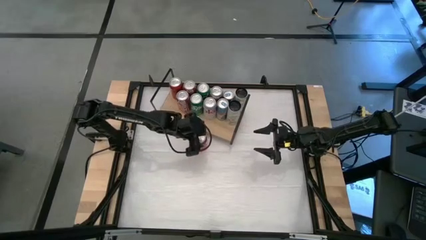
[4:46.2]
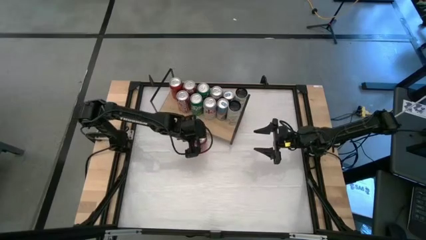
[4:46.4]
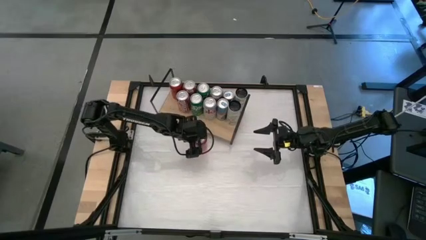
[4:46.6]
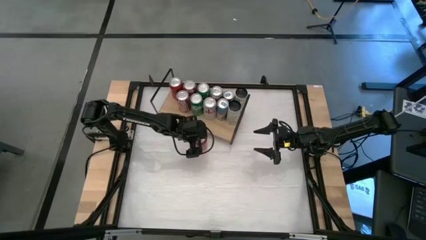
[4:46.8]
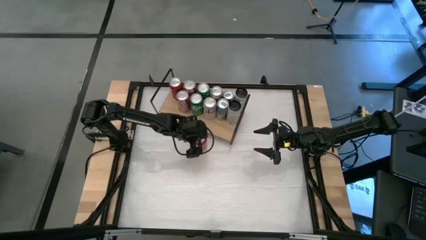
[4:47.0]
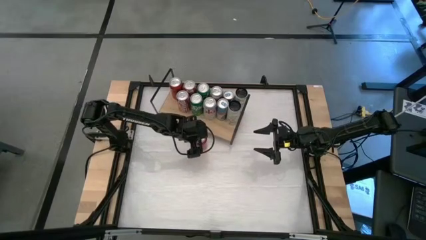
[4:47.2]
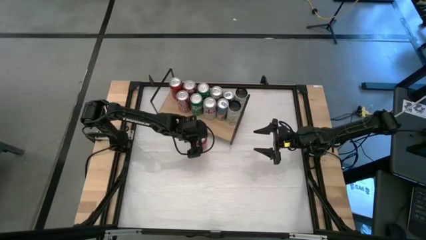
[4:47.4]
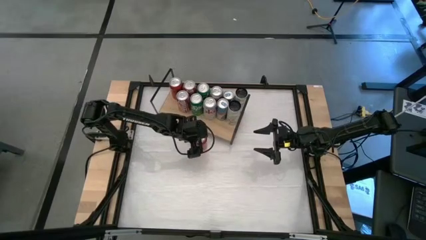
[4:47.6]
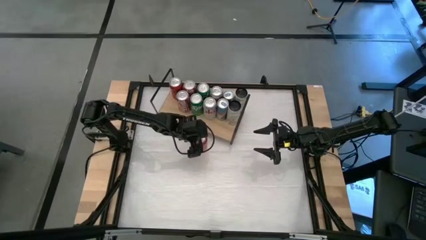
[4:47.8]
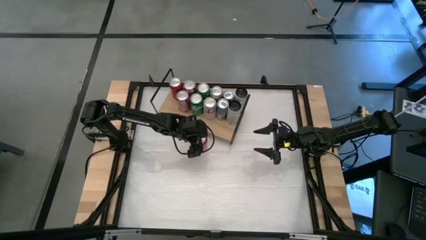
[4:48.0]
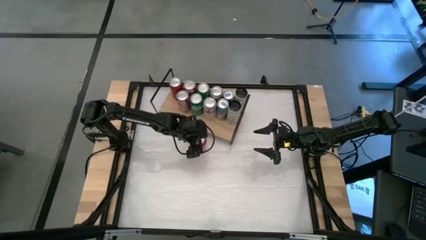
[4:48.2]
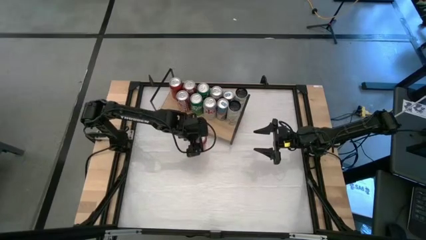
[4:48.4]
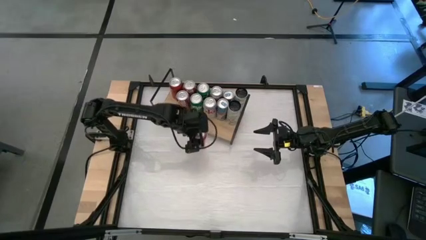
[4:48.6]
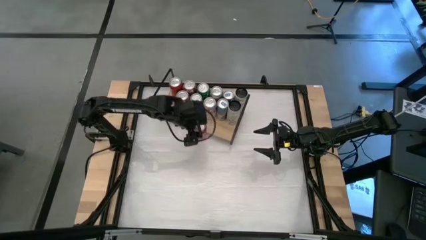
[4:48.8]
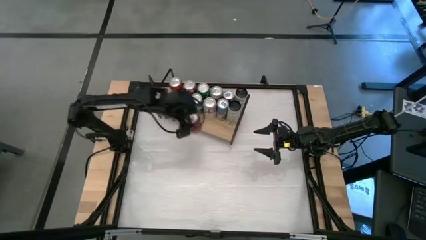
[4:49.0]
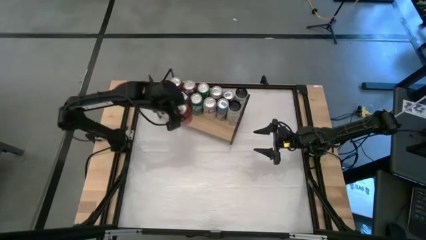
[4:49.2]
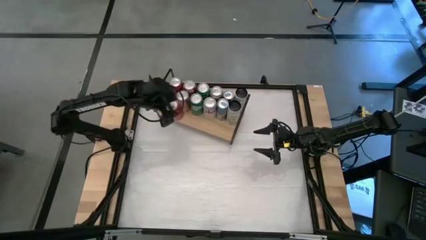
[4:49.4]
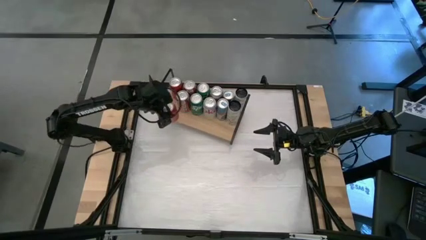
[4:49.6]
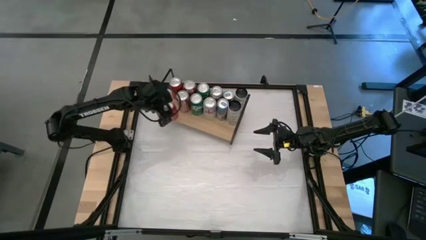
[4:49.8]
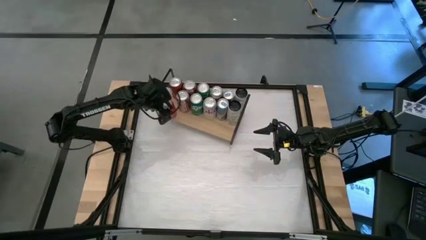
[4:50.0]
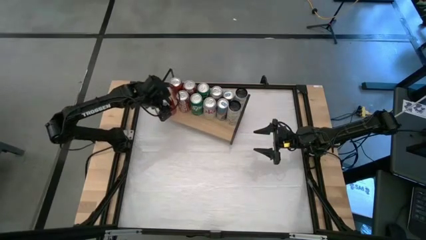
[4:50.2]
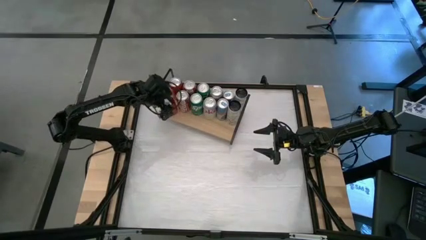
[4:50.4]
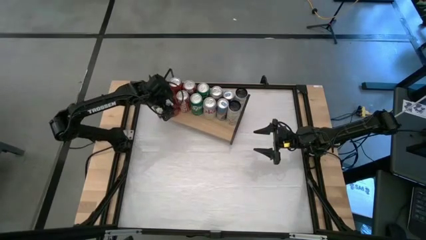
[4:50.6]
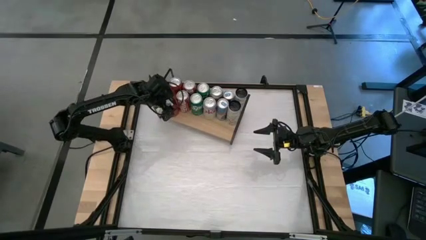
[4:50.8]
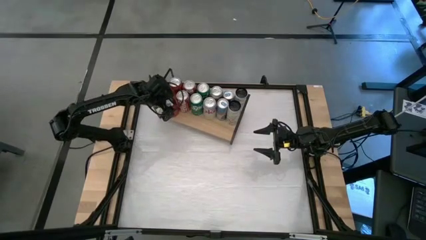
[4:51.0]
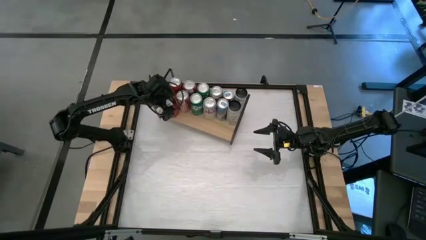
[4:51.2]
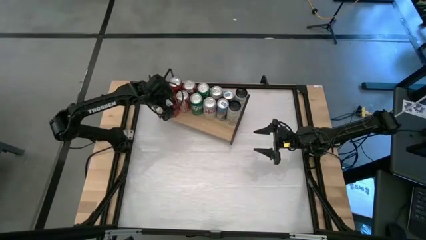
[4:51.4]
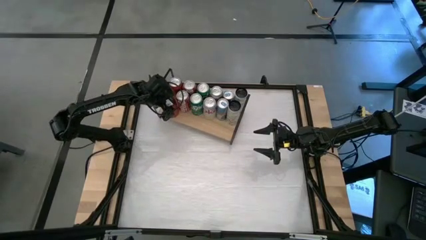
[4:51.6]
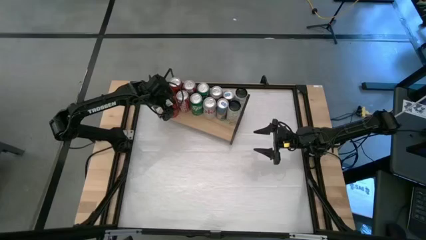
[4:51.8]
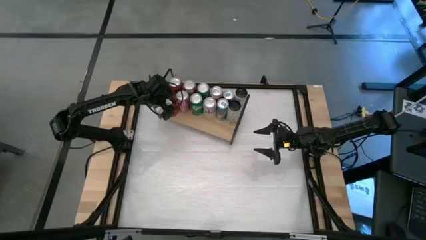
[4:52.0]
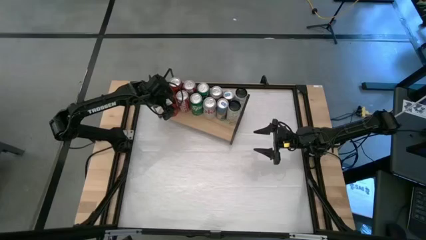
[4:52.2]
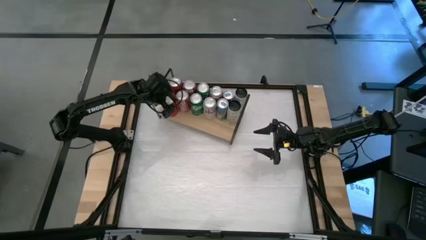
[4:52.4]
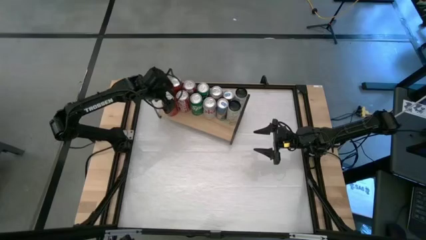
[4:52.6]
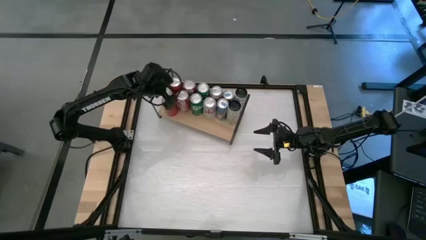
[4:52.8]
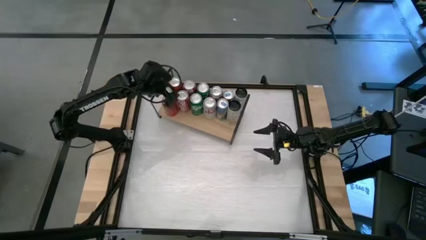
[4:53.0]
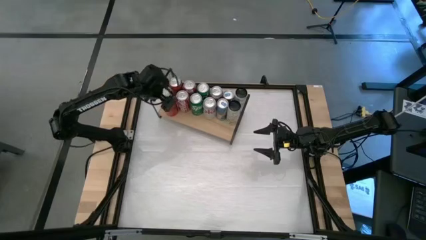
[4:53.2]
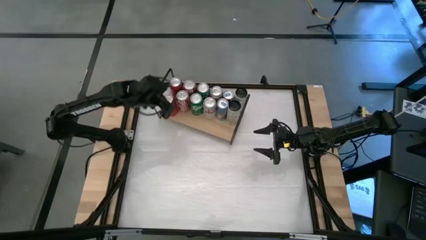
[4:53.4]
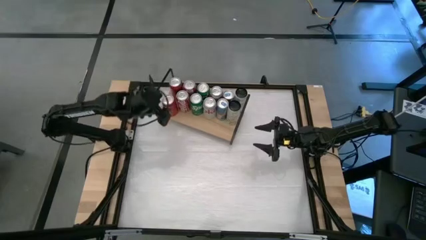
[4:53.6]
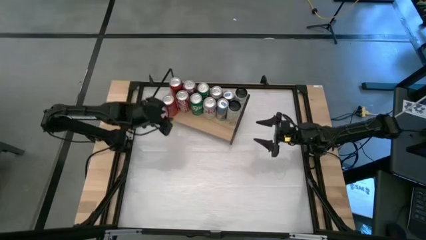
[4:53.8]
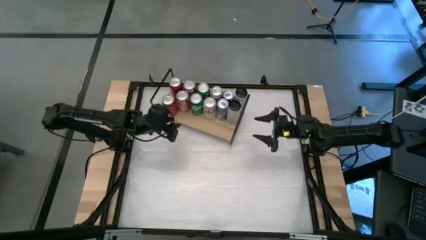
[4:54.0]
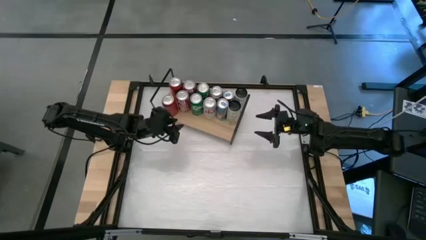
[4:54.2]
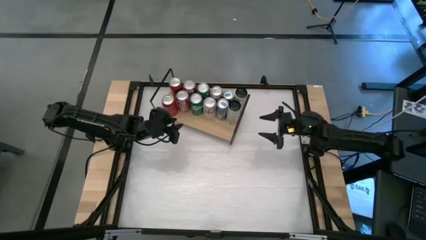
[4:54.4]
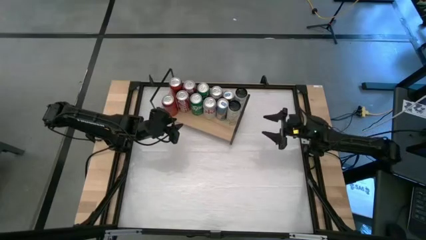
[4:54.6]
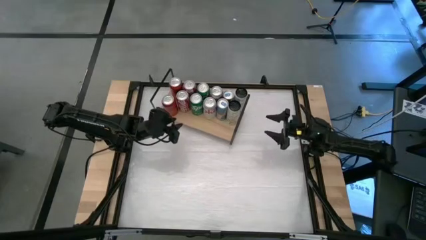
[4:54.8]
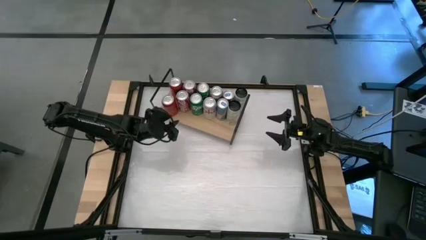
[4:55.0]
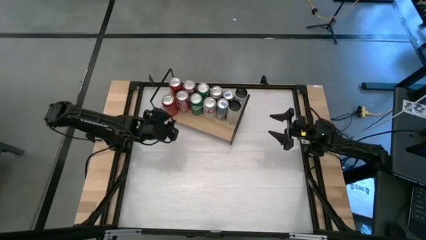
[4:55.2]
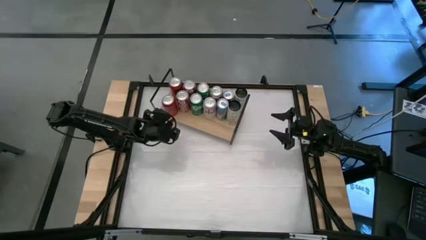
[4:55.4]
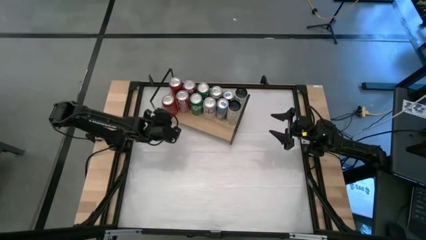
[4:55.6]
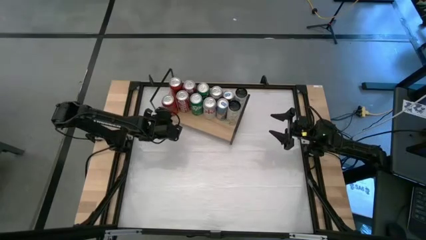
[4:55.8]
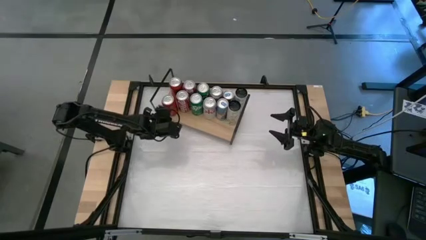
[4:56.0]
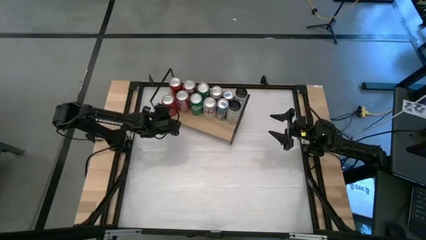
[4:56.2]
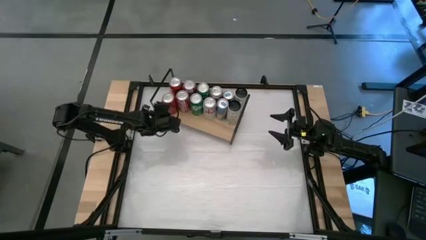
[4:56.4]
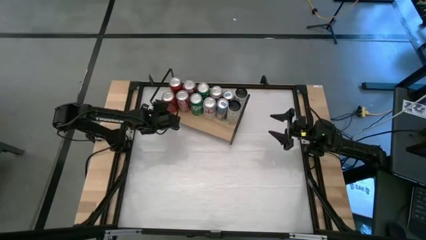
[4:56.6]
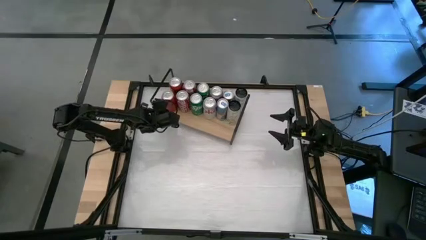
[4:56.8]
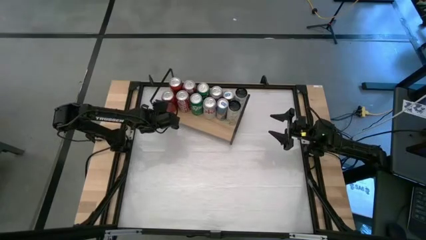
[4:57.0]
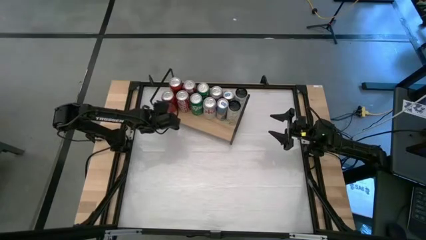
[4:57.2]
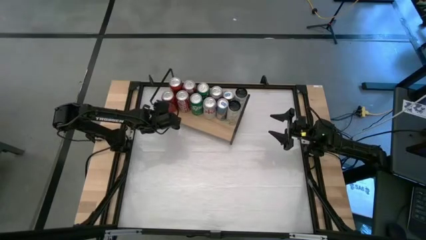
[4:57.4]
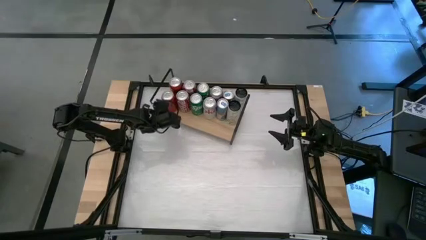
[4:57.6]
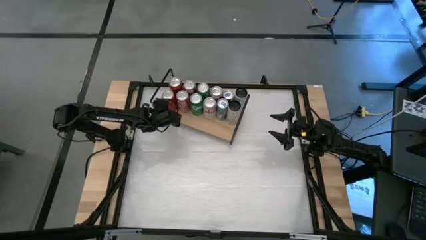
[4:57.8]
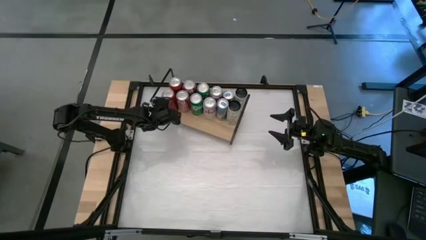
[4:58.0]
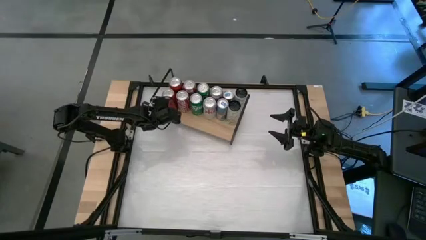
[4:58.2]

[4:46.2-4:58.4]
Task: Place canned beverage on shelf
Put the red black soda can on the shelf aligned with the other red black soda can

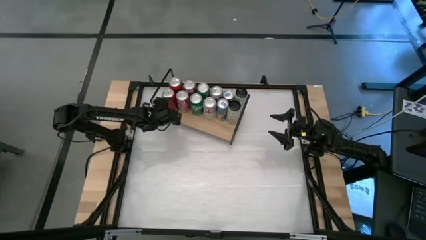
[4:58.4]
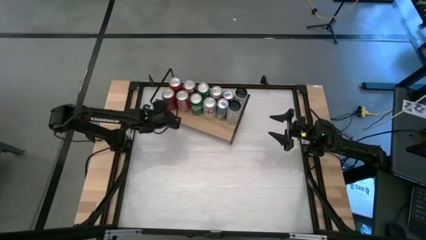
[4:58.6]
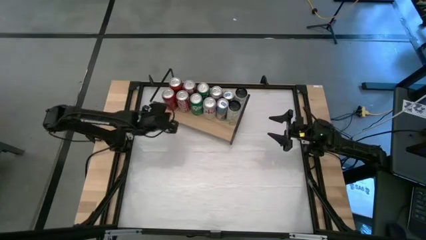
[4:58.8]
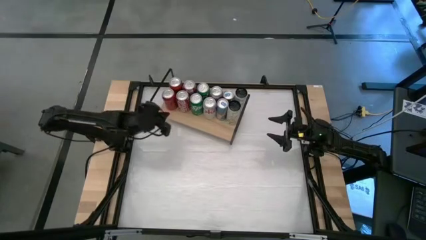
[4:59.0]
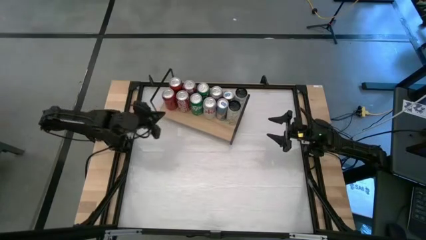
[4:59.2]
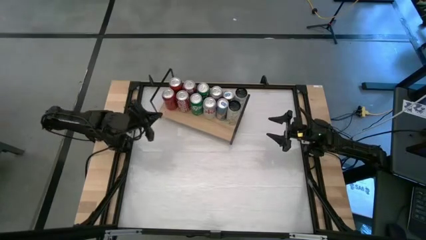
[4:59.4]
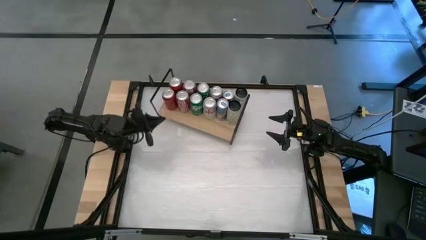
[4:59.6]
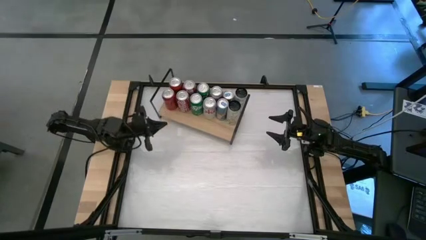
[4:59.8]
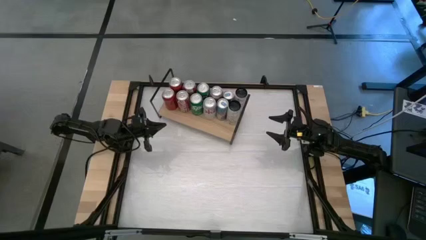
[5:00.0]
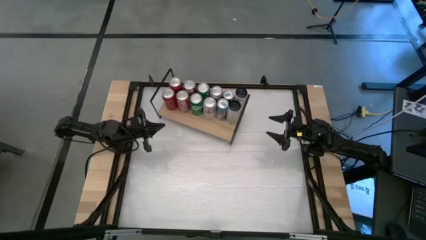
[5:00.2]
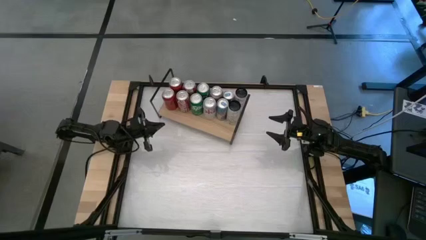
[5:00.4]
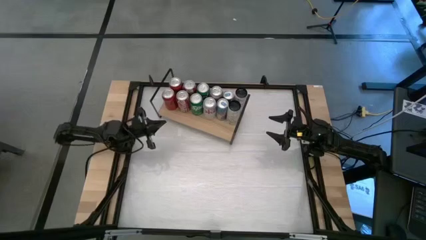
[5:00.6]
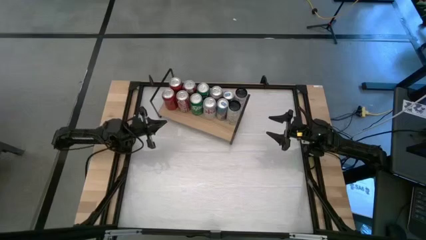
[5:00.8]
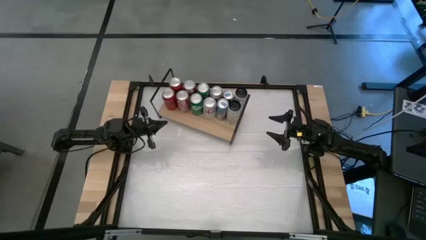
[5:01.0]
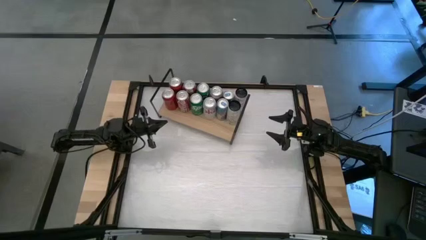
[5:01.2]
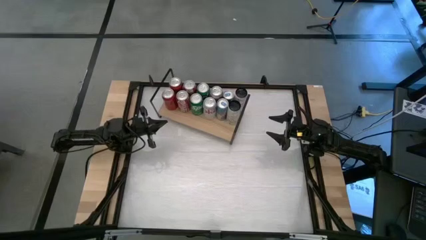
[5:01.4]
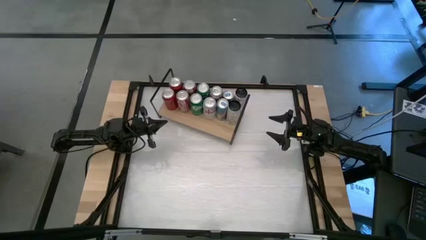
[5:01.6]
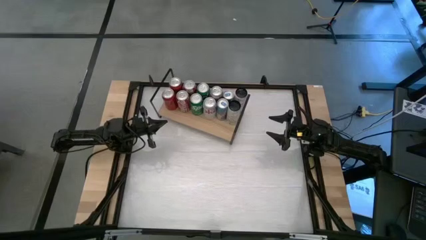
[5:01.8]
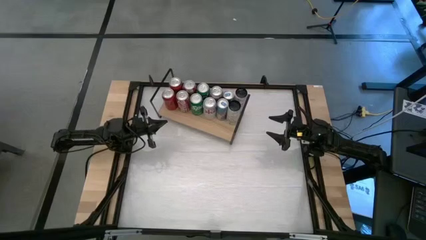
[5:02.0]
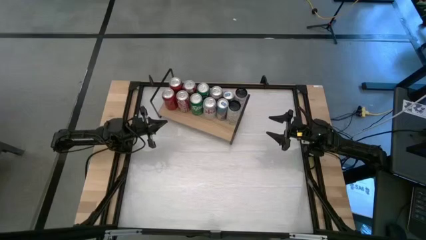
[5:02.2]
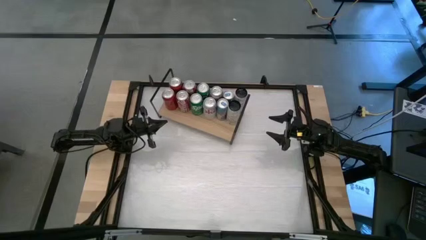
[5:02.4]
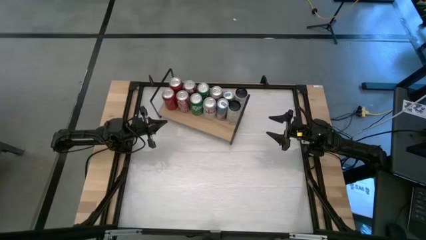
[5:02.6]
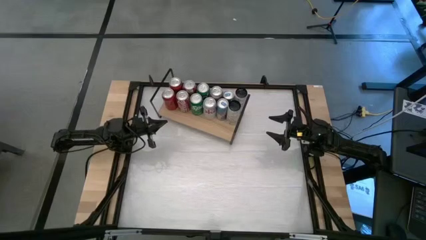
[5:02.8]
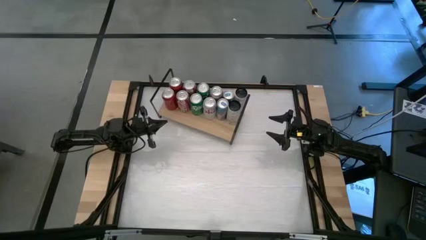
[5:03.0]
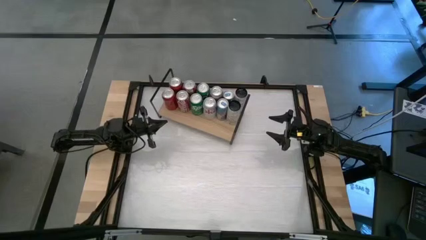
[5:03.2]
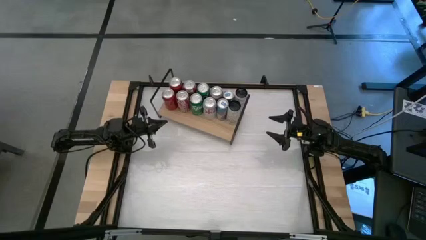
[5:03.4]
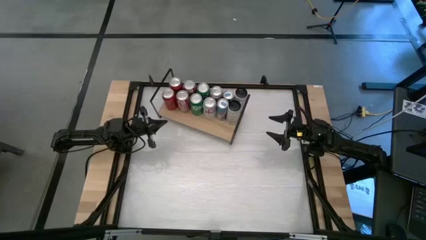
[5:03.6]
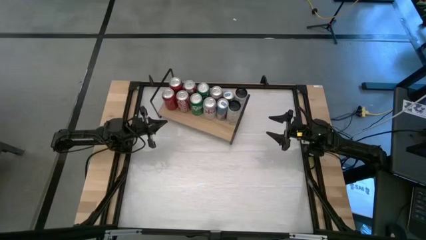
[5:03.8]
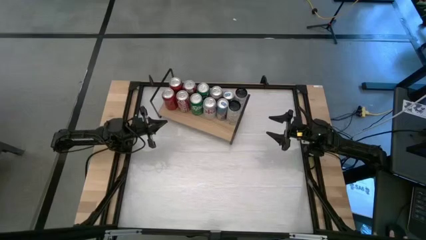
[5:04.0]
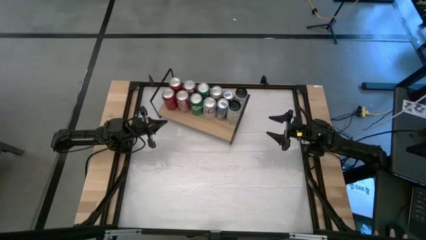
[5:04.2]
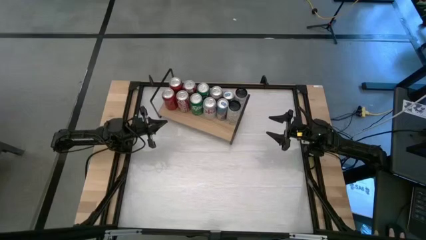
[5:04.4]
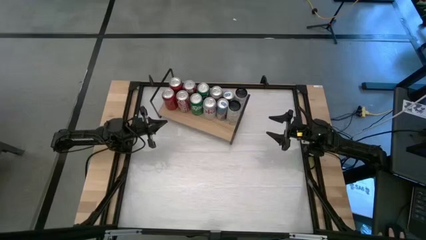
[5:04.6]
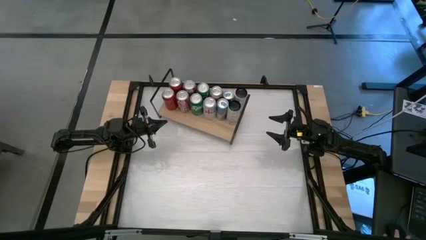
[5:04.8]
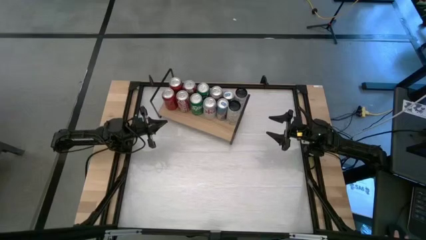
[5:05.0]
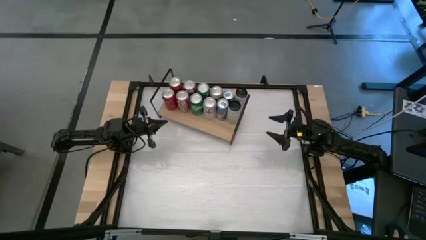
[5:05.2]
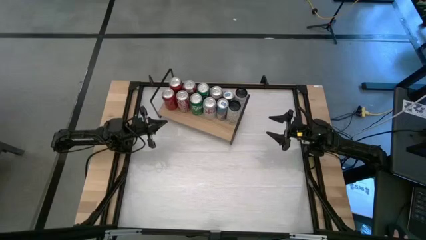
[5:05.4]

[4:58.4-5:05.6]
Return to Home Position
